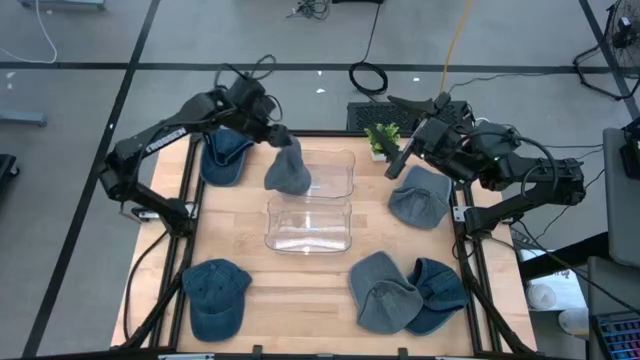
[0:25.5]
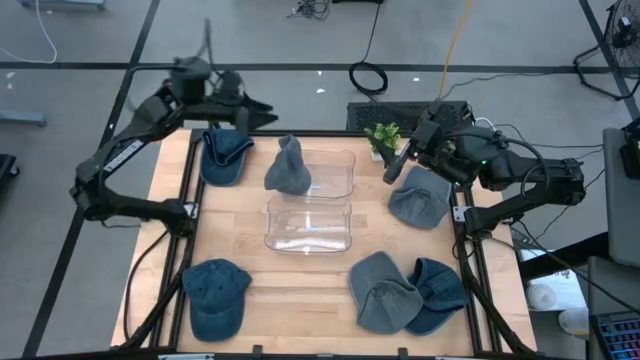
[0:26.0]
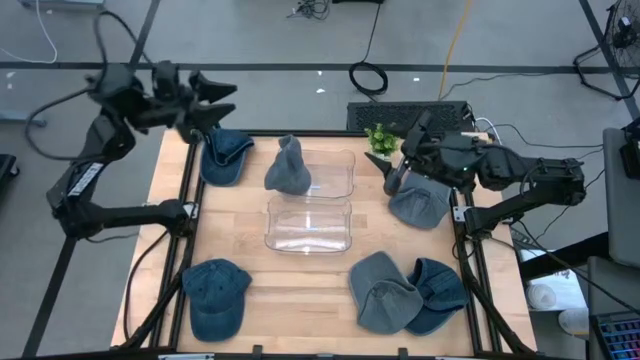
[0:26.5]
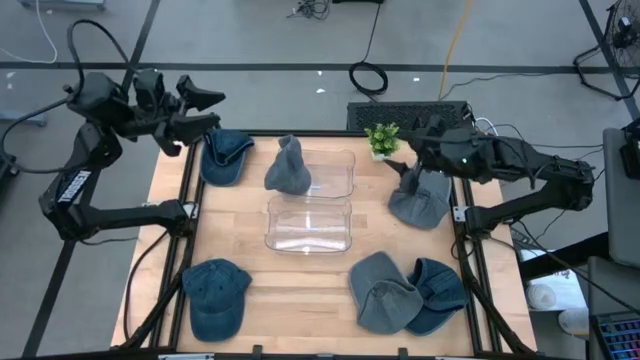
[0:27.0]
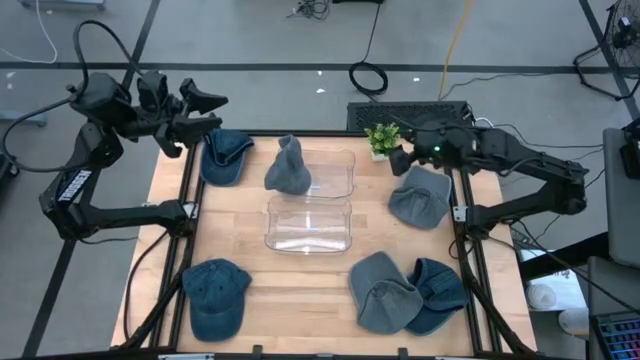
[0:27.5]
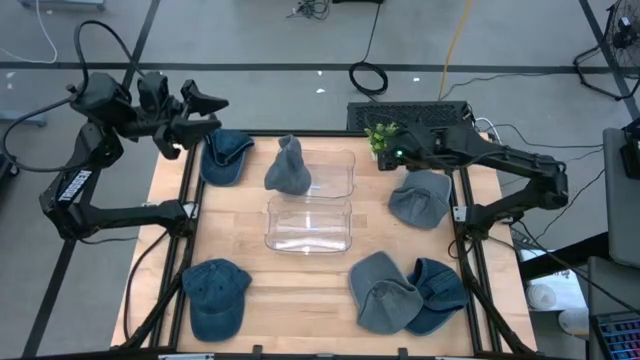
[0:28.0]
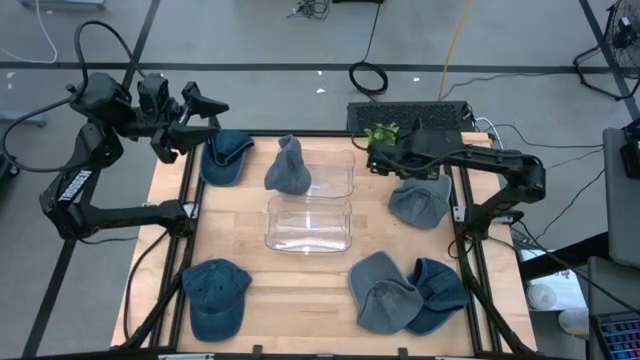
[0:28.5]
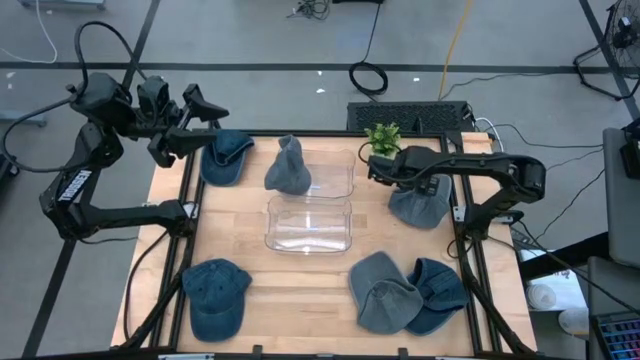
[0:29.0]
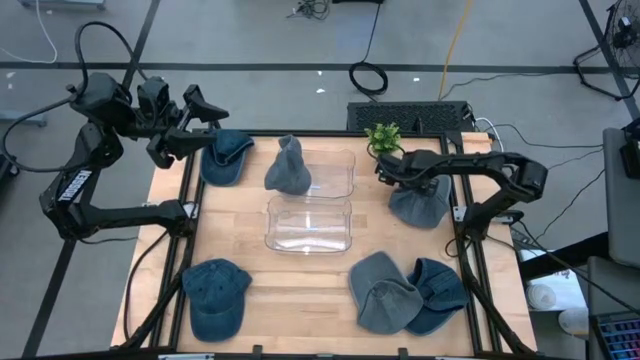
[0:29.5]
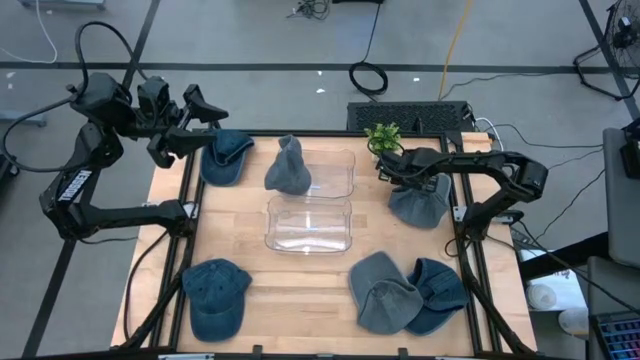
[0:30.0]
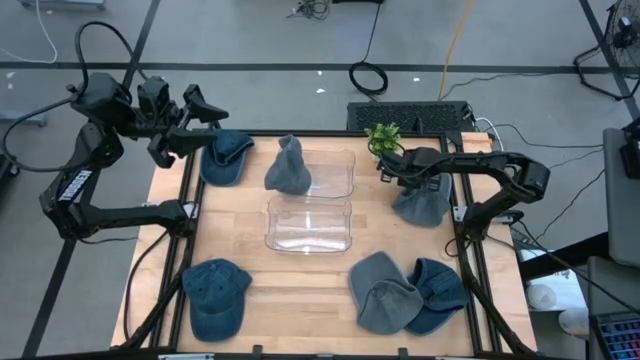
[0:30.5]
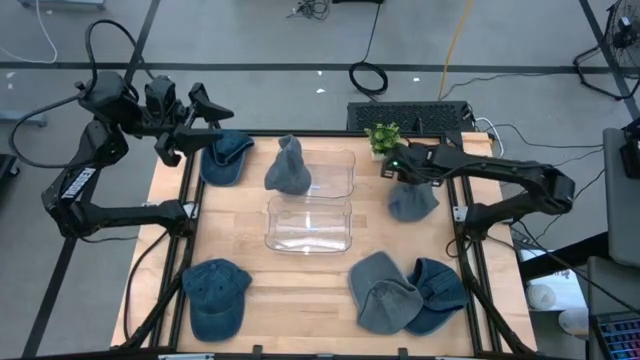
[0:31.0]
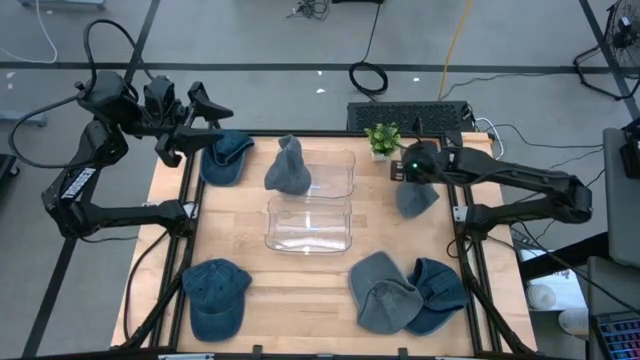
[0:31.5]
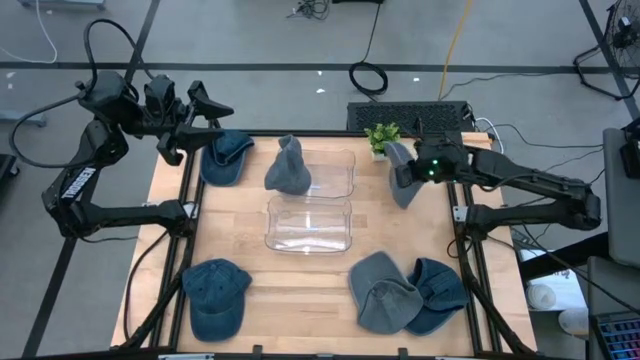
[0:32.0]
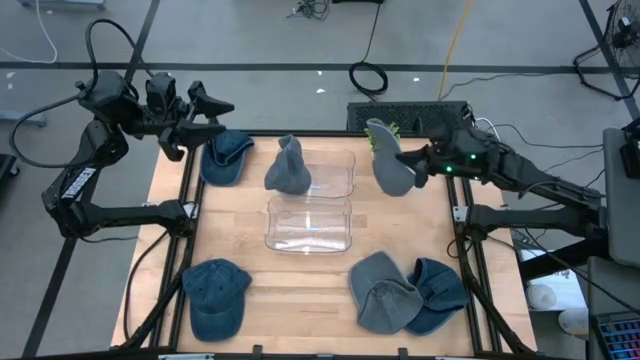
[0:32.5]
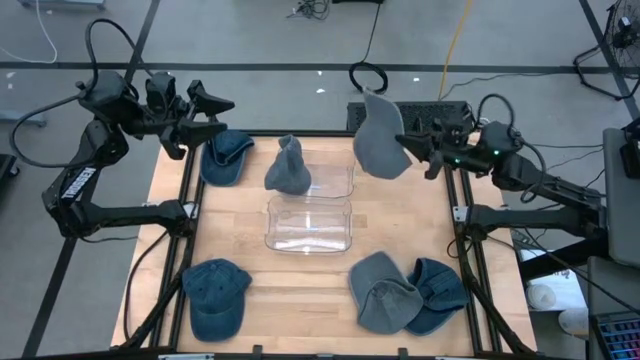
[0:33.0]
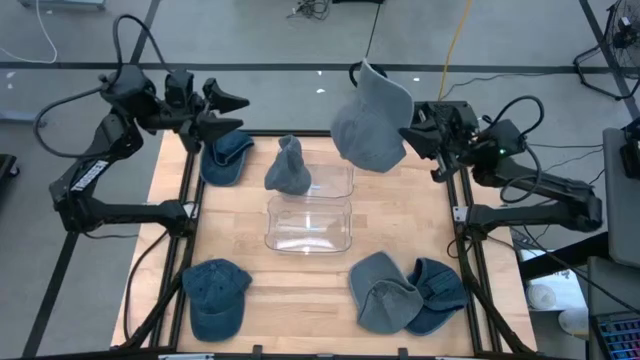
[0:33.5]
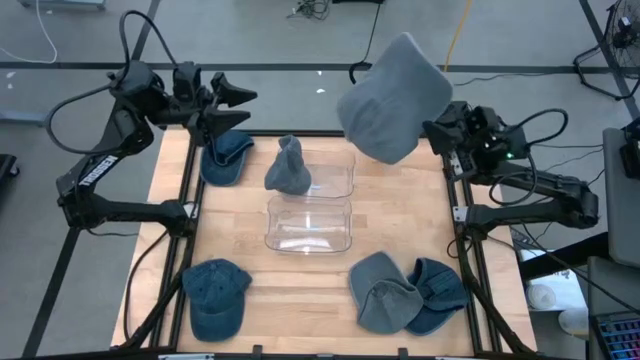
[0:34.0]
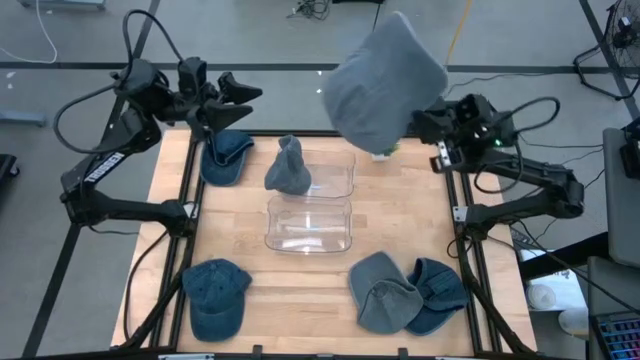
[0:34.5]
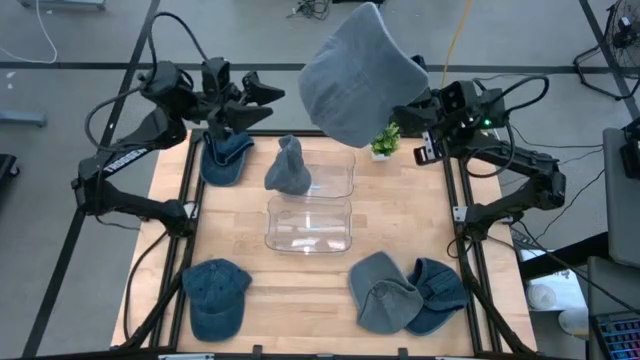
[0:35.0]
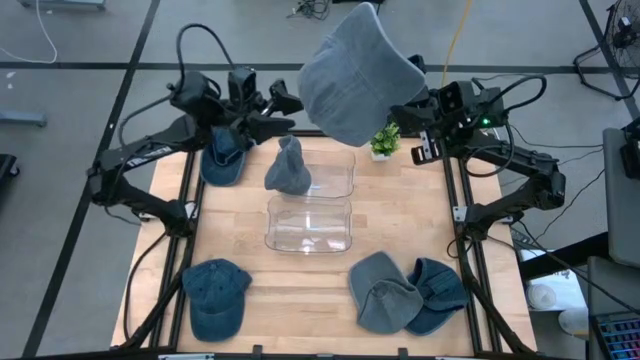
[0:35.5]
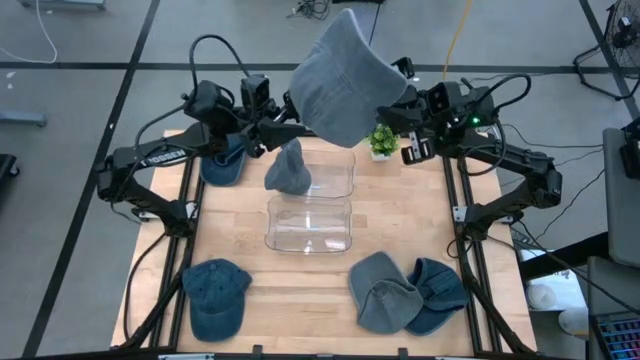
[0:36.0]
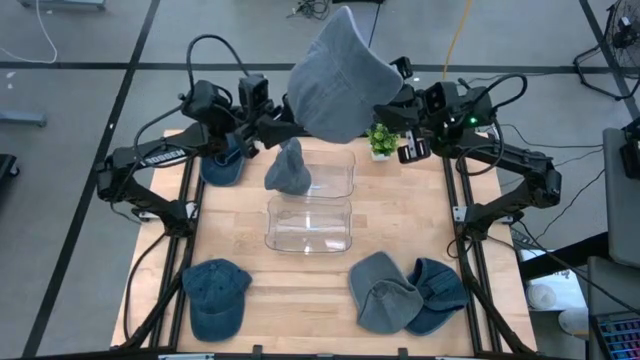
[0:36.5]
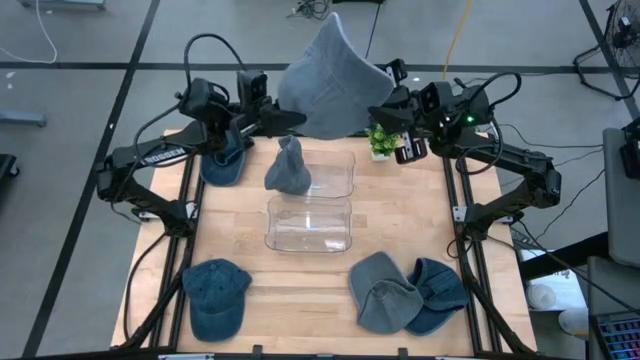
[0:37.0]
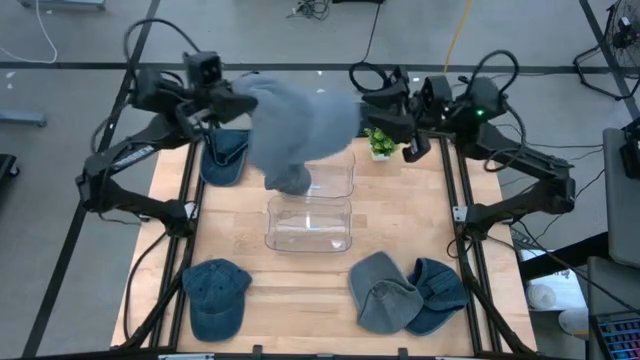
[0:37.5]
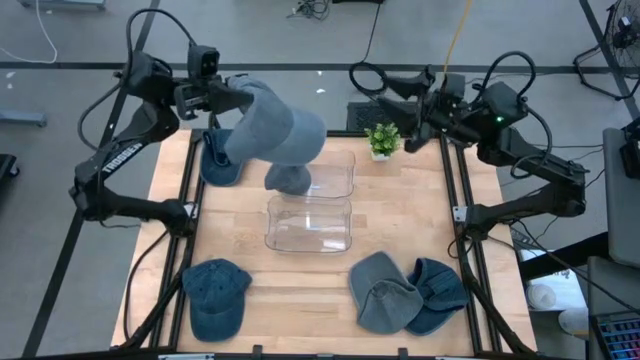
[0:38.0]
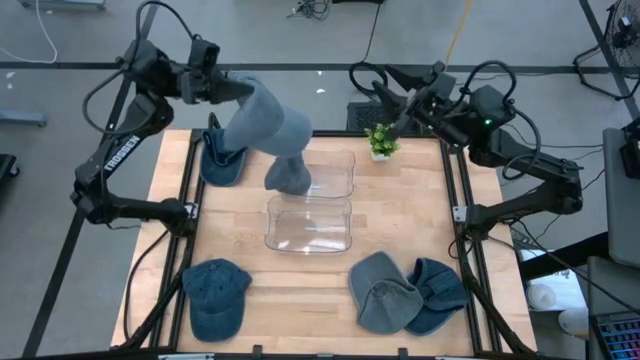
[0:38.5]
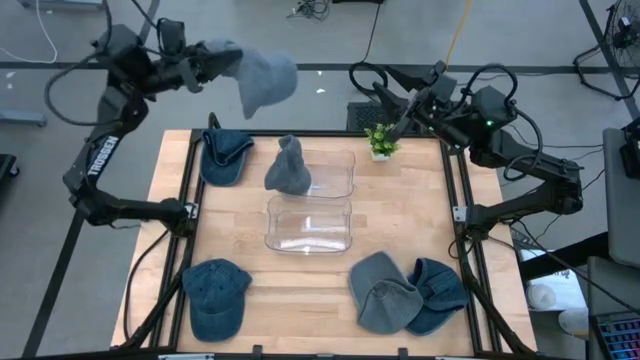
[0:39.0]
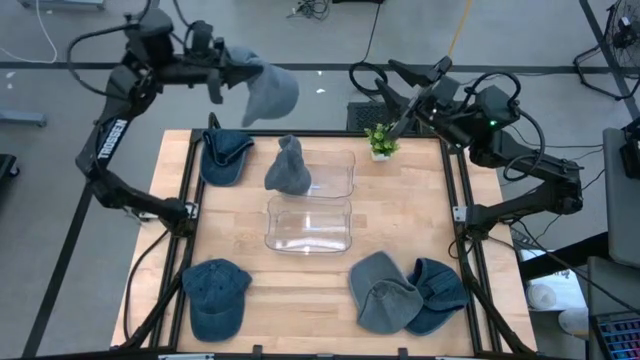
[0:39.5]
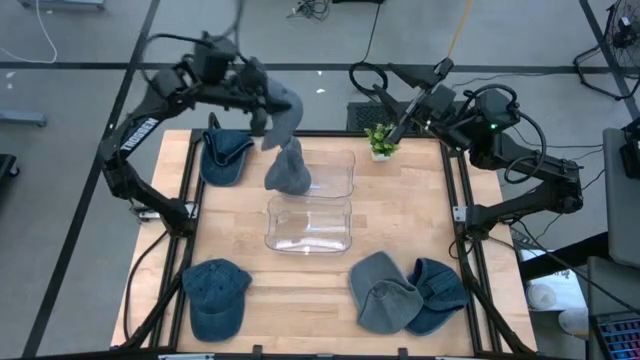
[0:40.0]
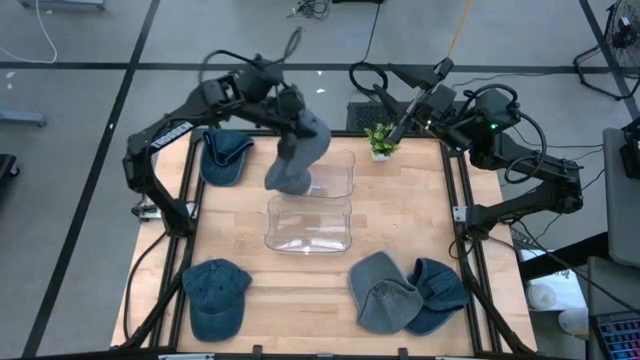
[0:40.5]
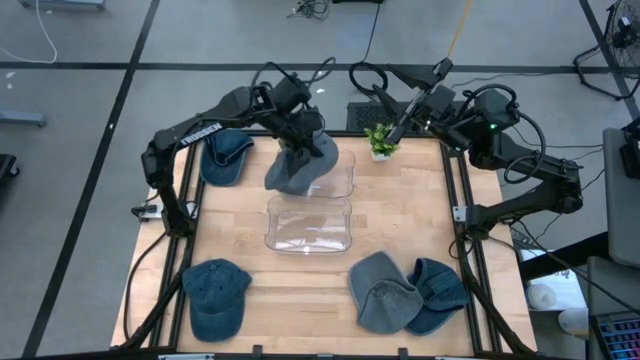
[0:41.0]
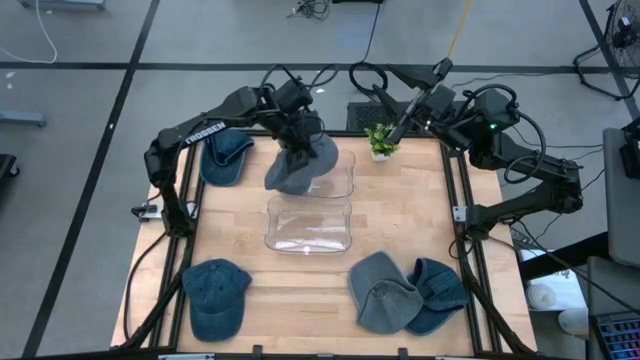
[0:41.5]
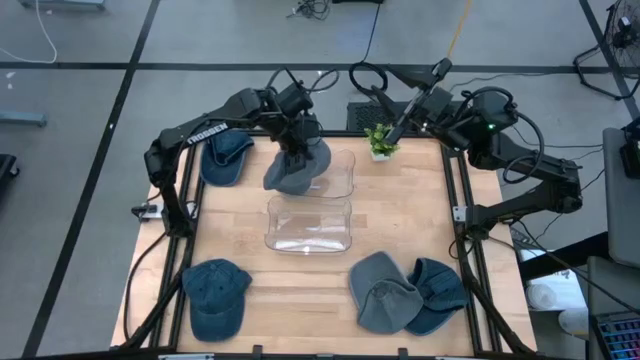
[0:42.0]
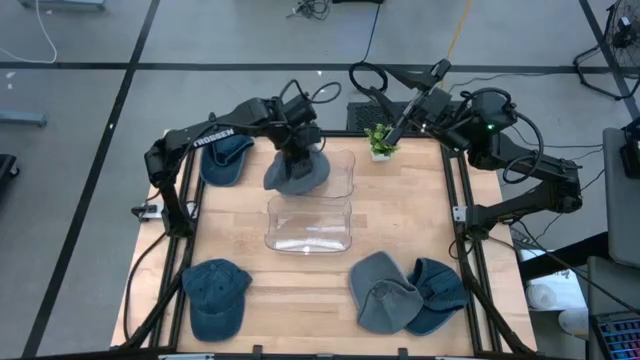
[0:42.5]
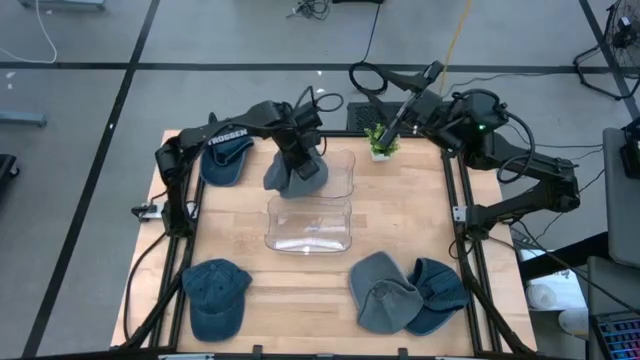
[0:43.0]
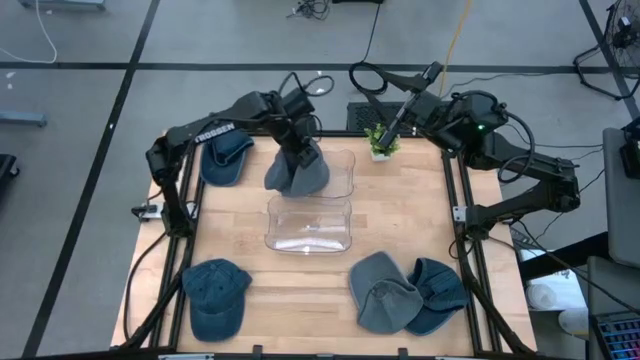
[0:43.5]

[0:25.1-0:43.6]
Task: Pick & Place hat
Put the top gray cap into the top transparent bin

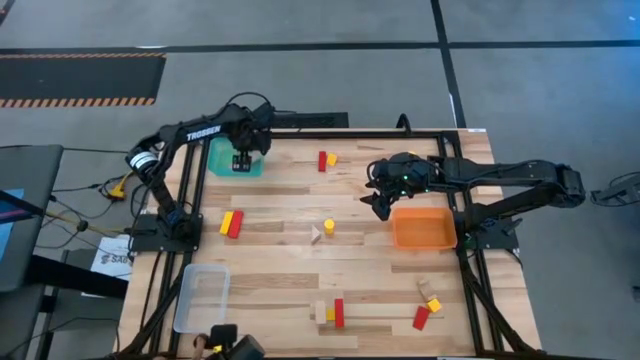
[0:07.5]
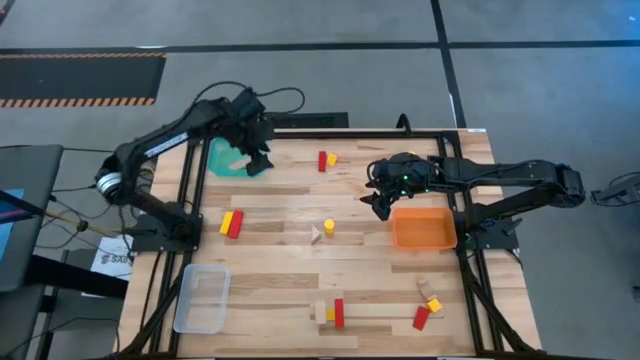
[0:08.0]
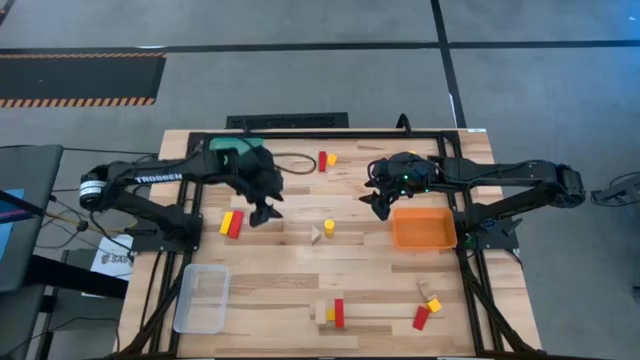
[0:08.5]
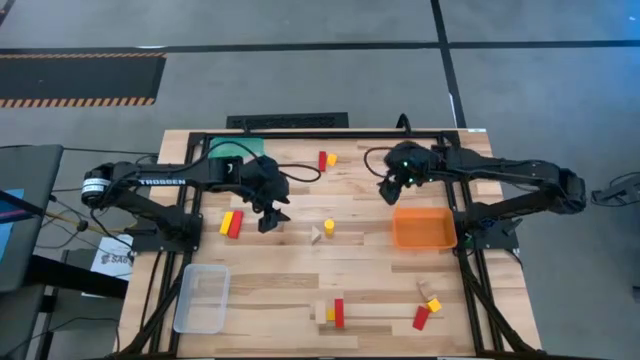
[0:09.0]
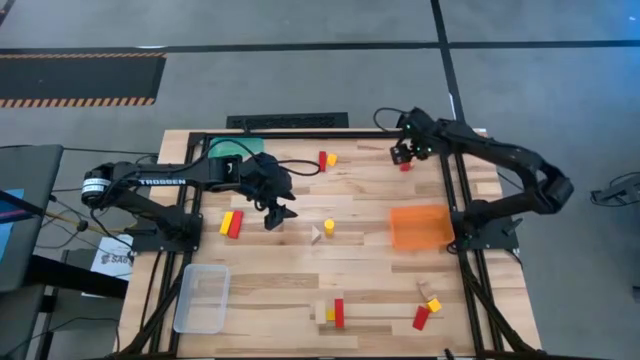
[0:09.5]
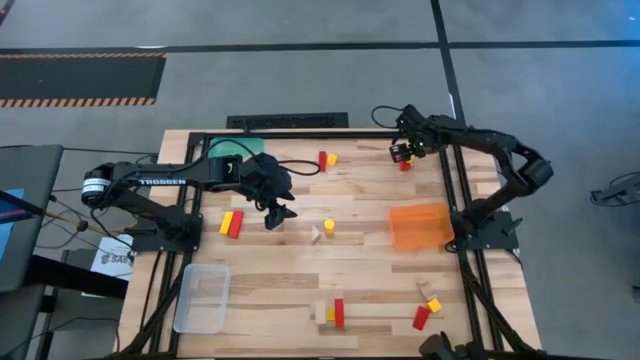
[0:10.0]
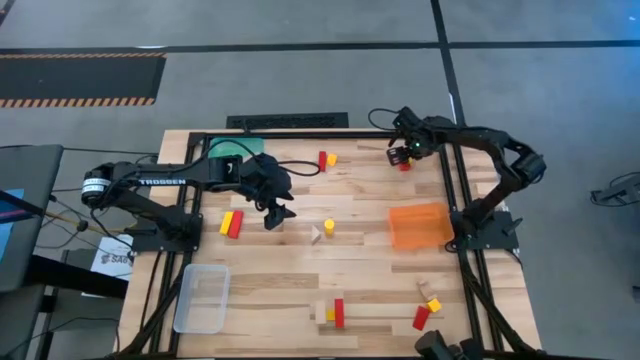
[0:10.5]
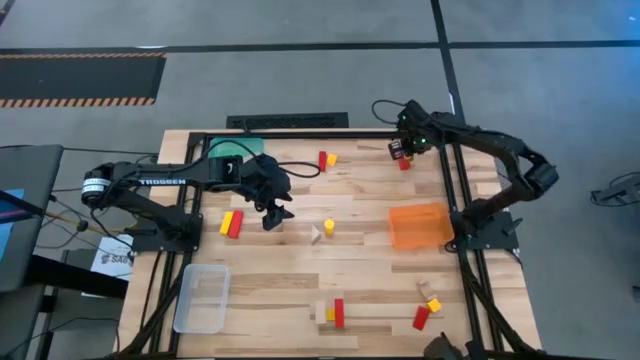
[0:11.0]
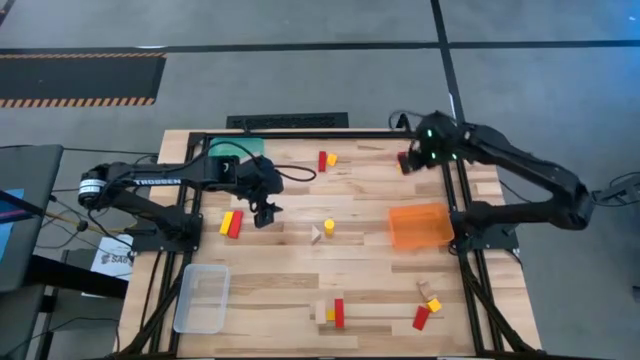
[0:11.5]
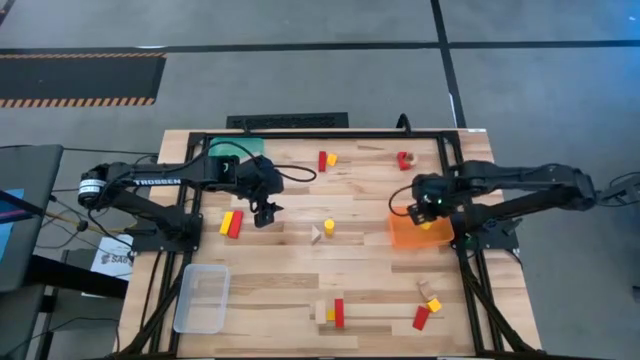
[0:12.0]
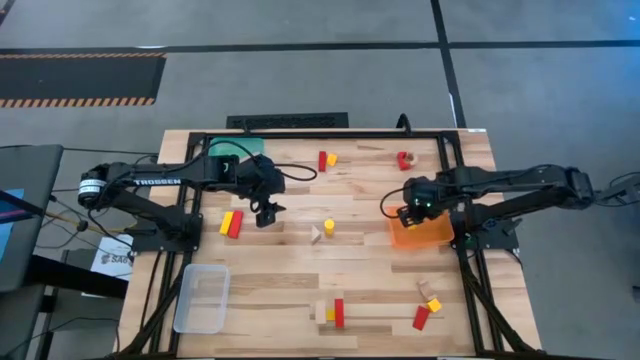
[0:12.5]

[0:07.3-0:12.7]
Task: Sort & place blocks by color
Put the yellow block into the orange bin
